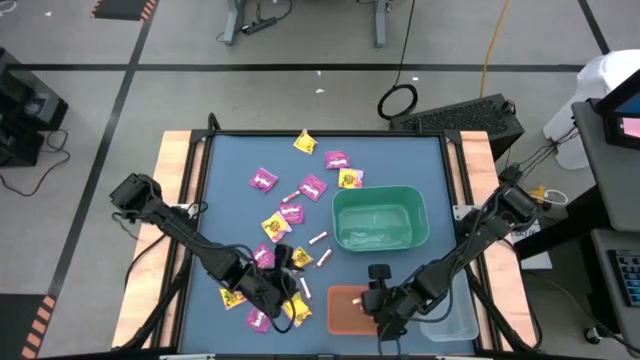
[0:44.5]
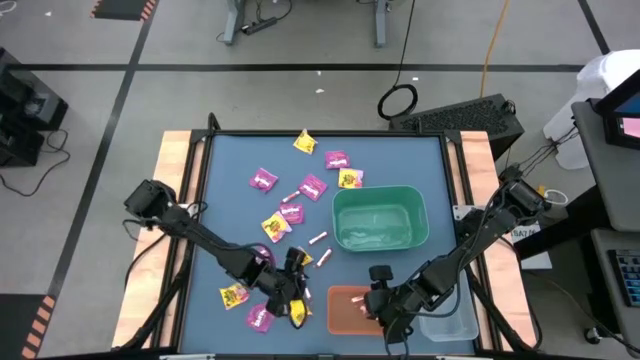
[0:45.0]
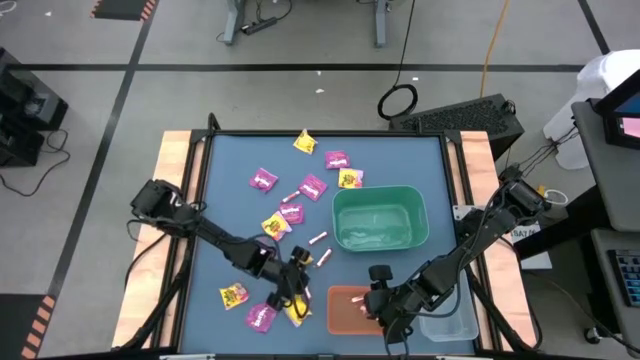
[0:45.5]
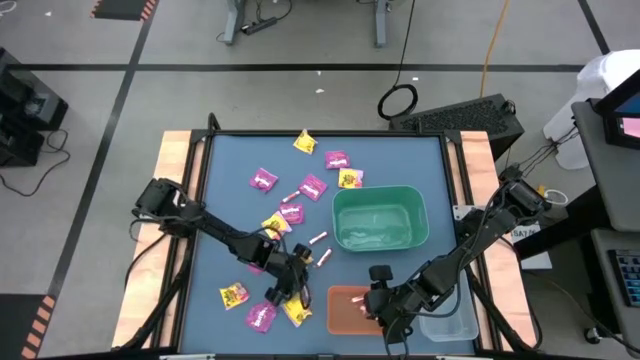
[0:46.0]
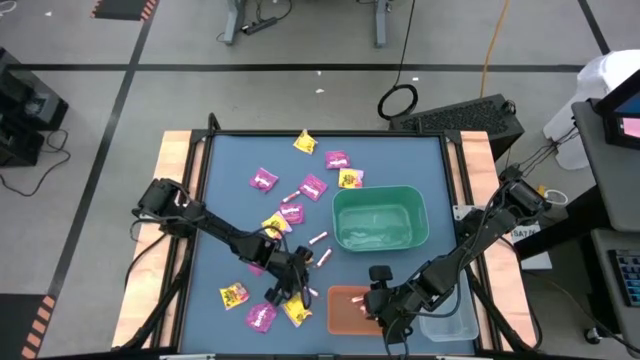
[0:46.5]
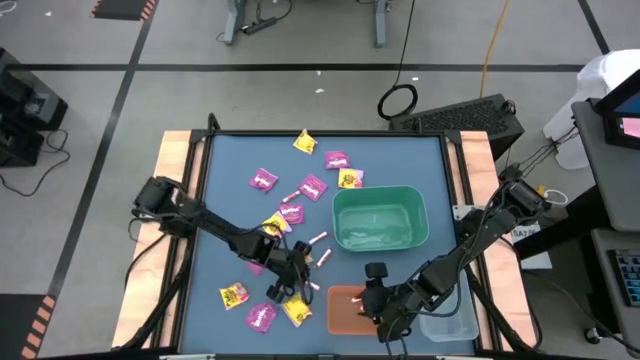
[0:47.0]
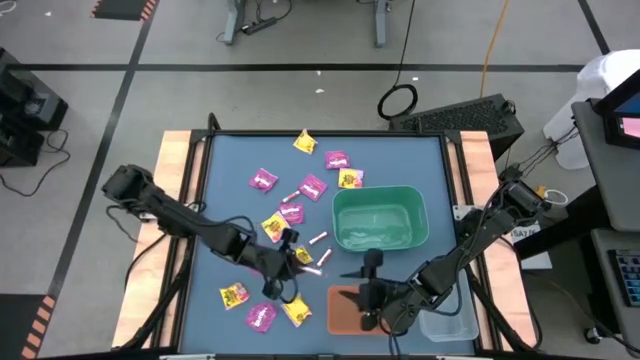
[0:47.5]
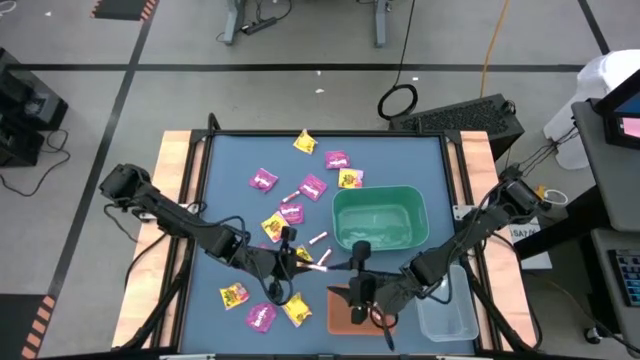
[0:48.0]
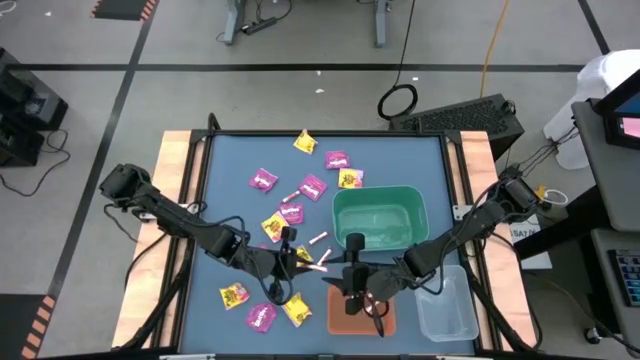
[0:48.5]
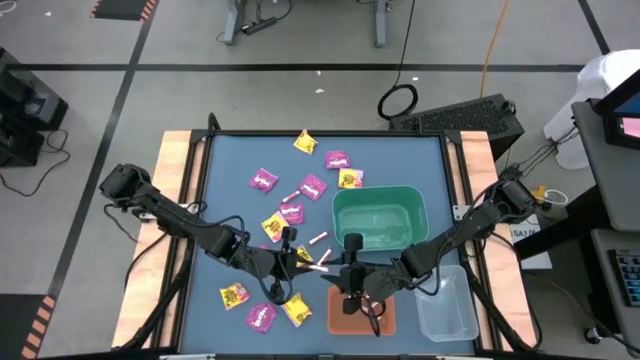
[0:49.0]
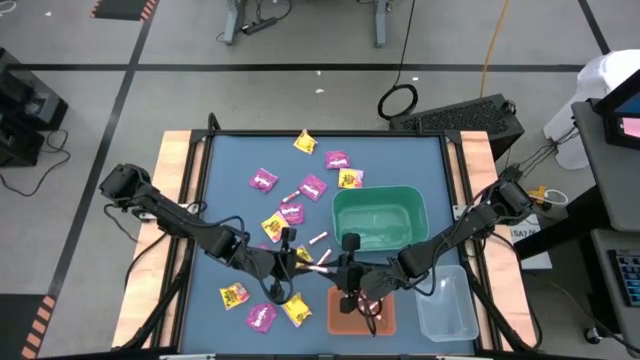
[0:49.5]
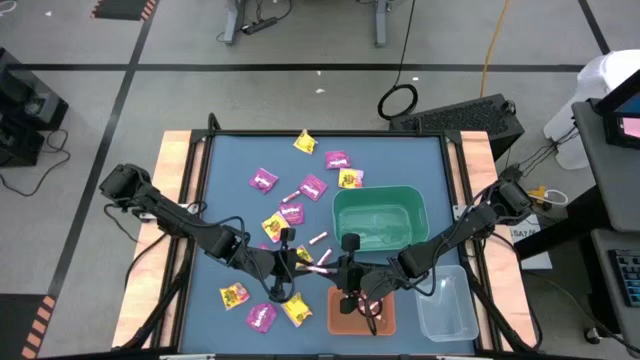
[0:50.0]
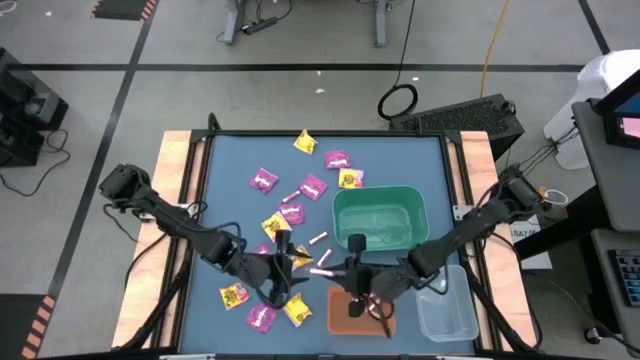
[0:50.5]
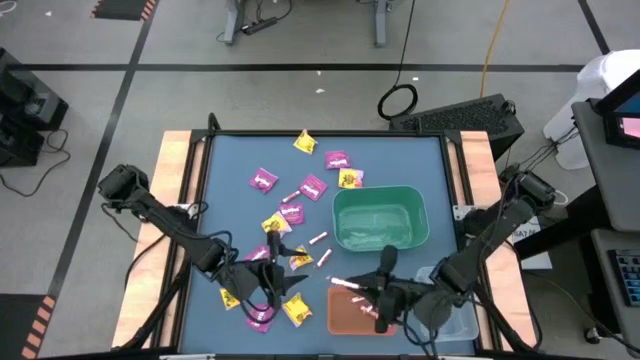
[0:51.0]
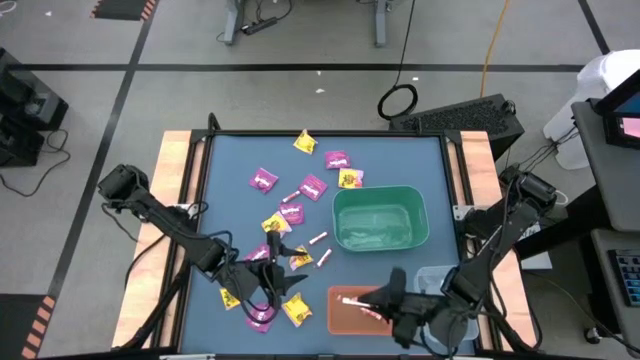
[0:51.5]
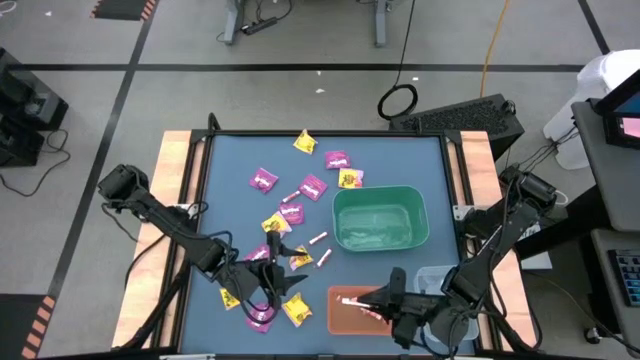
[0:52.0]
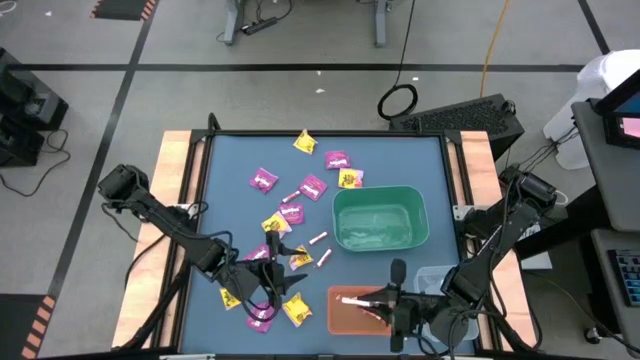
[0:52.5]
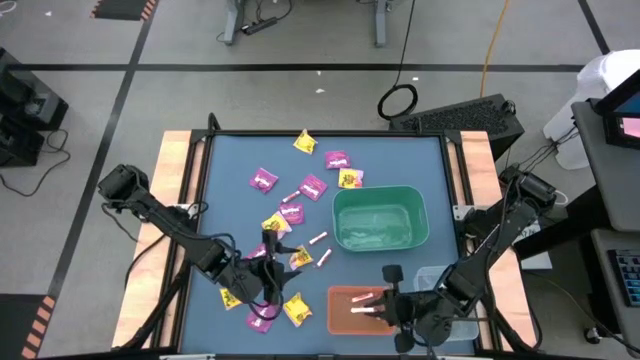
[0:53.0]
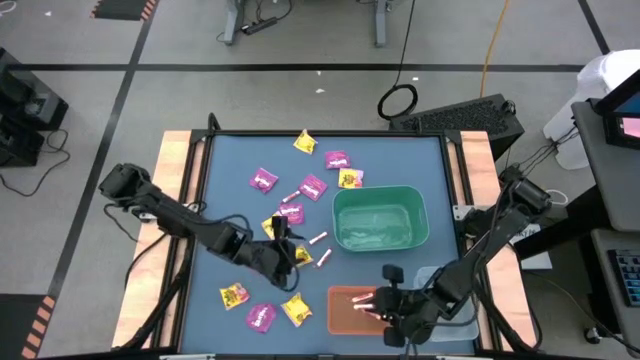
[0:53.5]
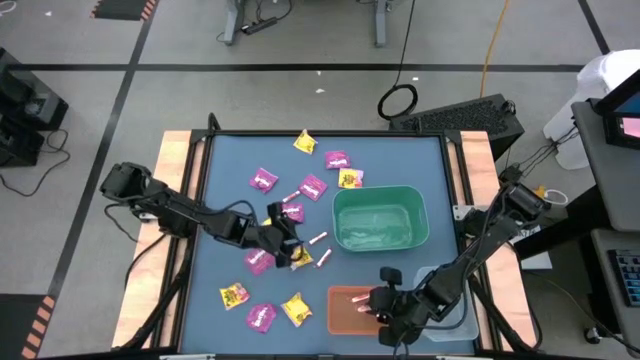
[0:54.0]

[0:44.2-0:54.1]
Task: Sort candy
Put the white candy into the orange bin

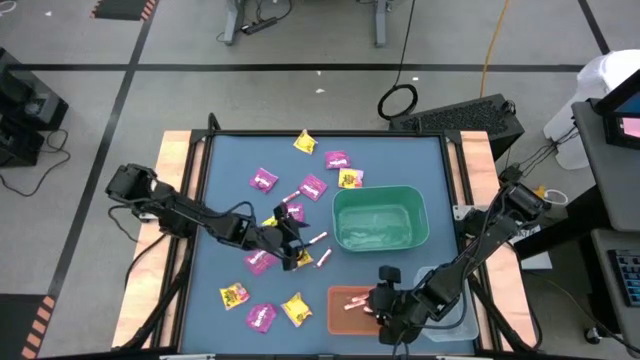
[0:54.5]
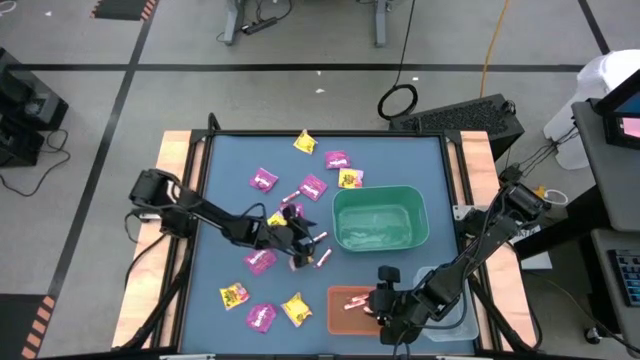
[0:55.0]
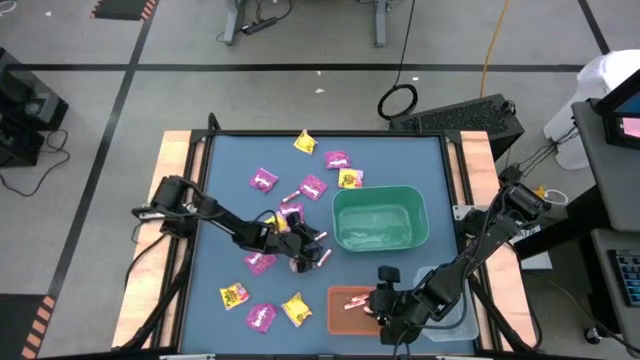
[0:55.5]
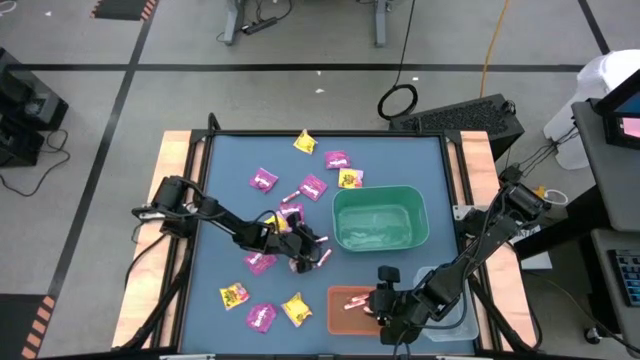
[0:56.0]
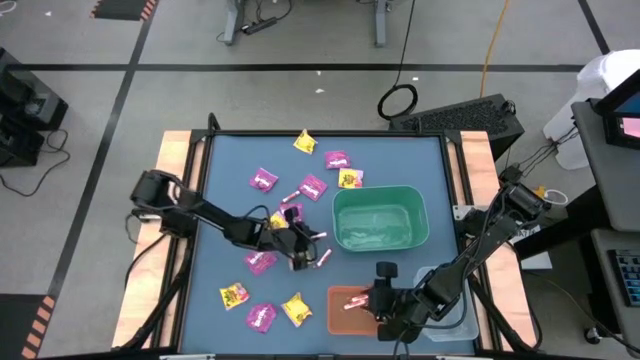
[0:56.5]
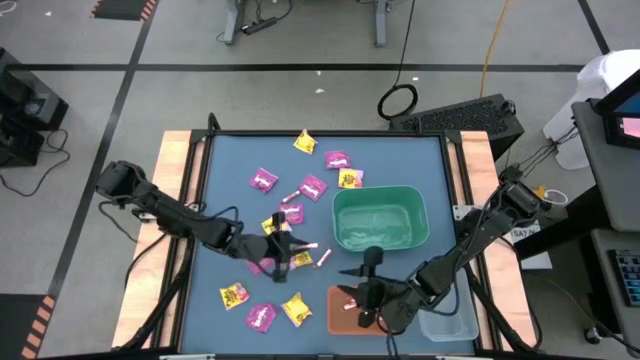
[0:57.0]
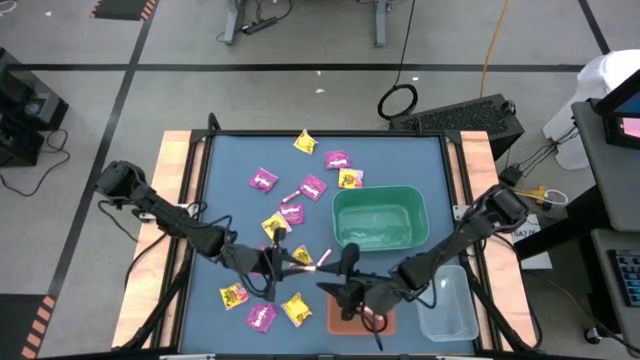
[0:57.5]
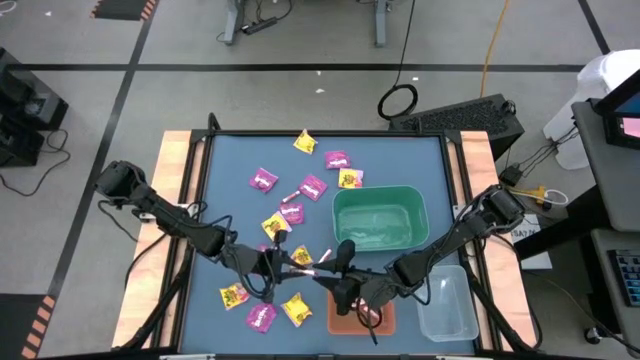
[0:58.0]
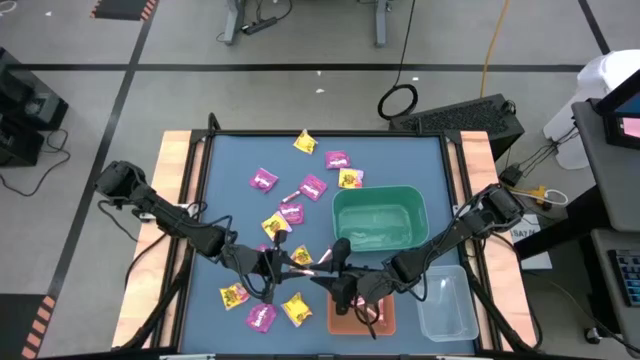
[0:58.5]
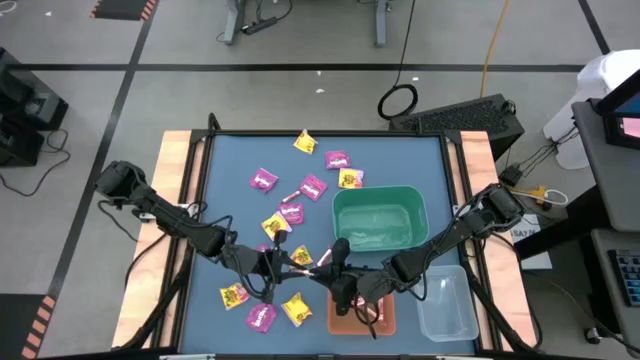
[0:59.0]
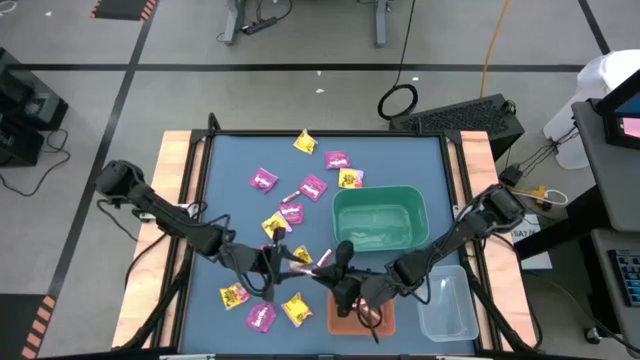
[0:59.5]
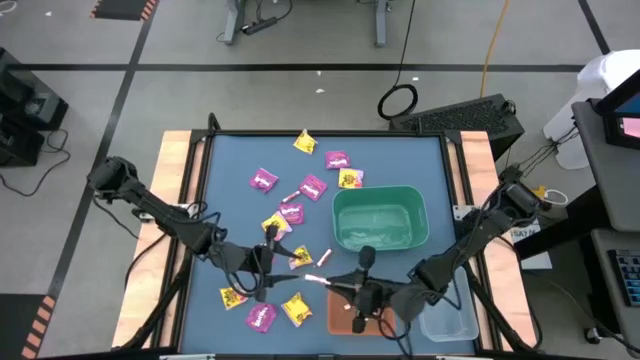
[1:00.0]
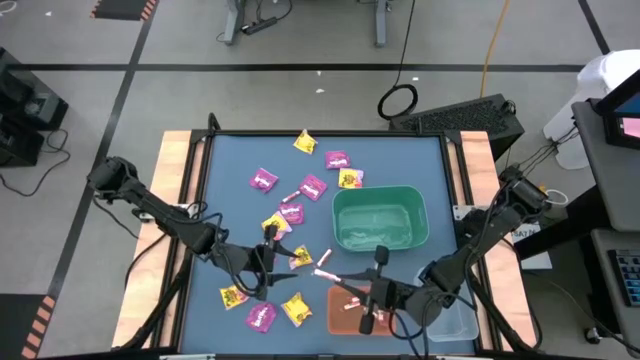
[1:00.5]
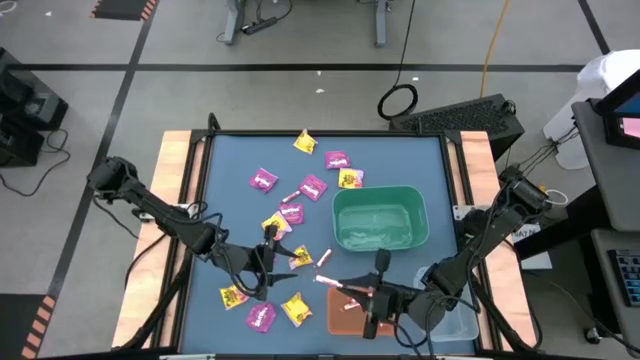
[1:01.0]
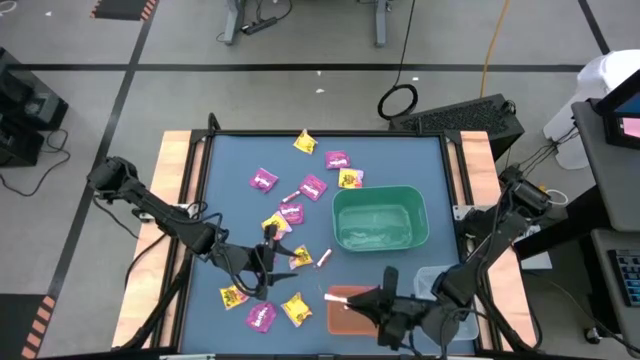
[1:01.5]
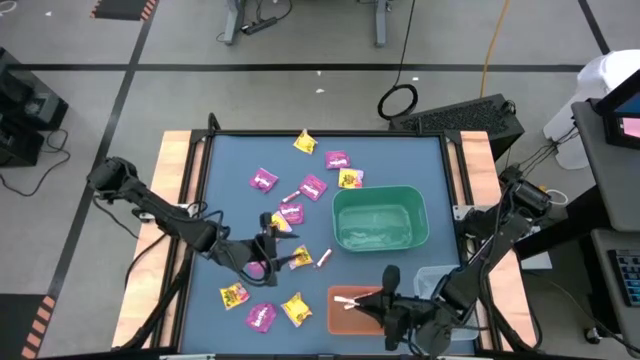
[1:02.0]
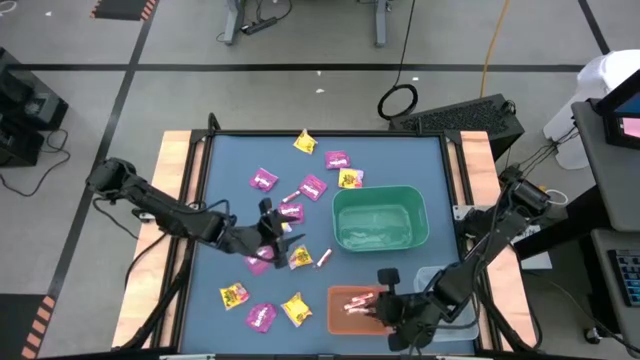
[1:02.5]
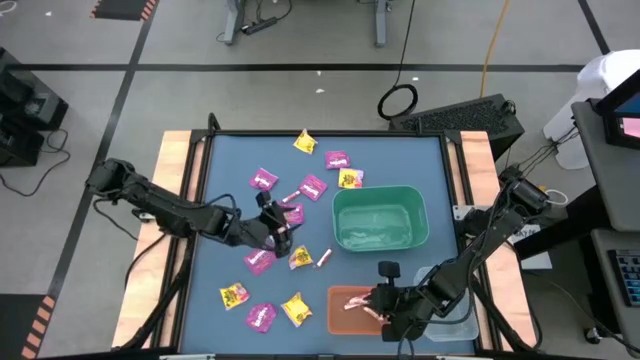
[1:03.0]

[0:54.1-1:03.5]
Put the white candy into the orange bin

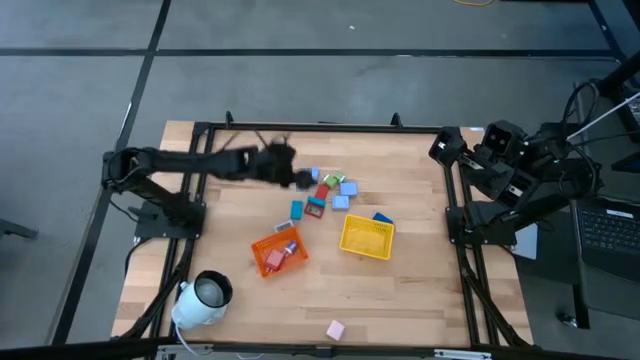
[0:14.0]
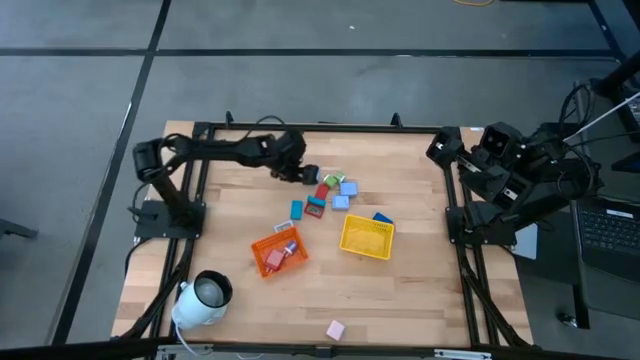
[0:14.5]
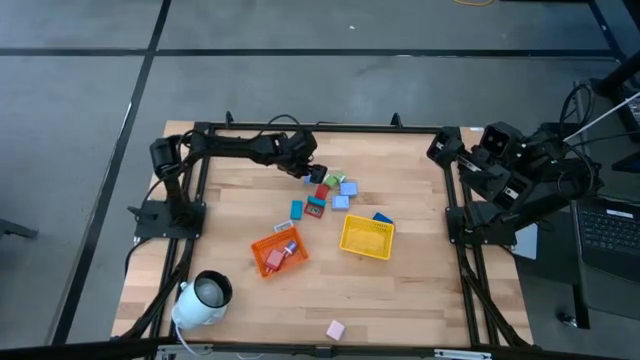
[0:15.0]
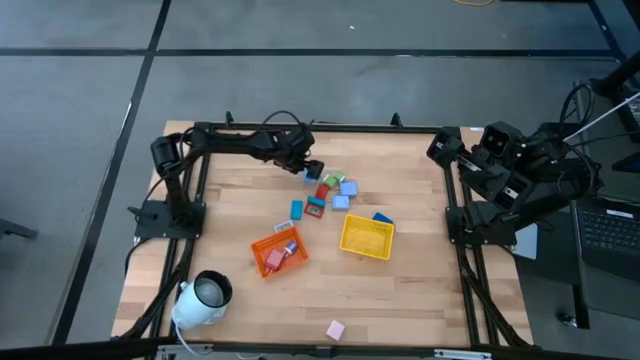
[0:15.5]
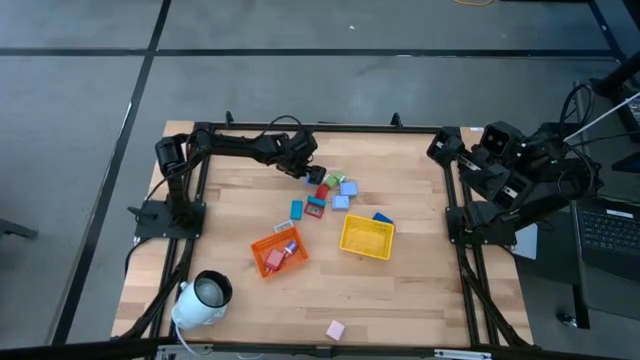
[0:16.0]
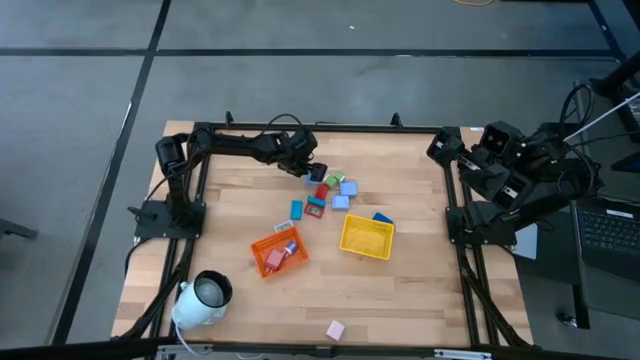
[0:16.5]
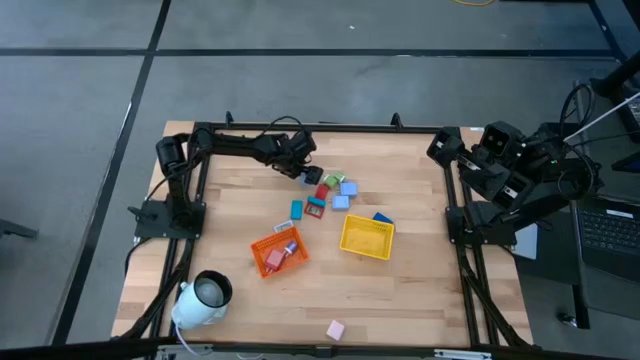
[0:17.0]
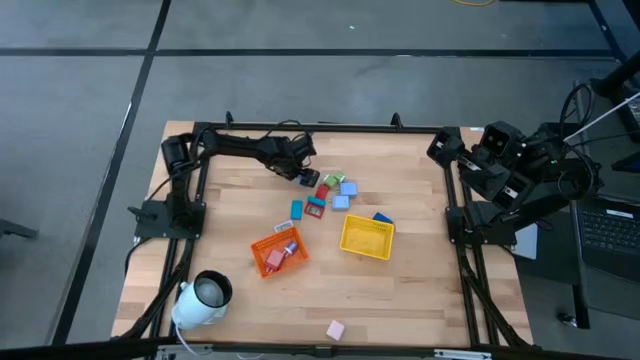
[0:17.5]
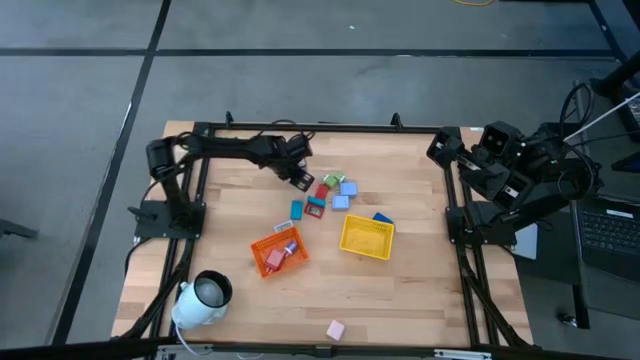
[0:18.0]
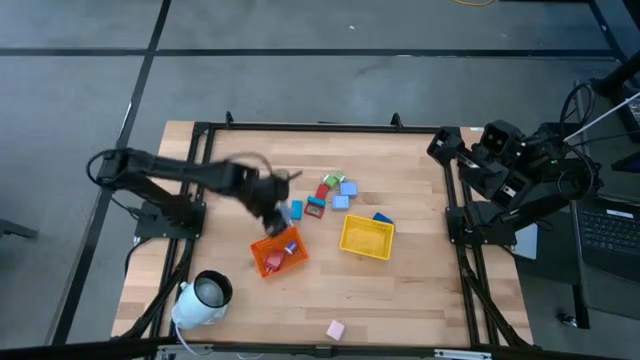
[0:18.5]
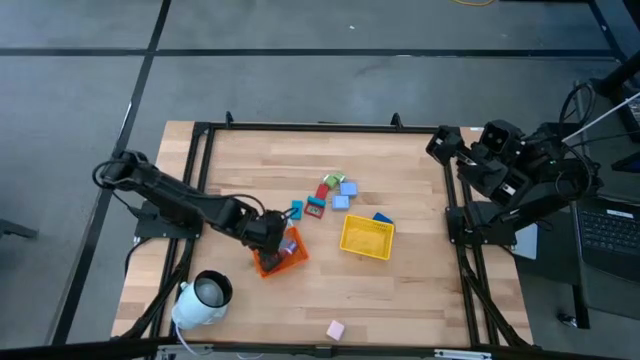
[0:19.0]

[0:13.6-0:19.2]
Task: Pick & Place Office items
Put the top light violet charger adapter into the orange bin
